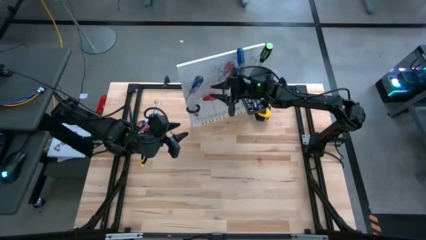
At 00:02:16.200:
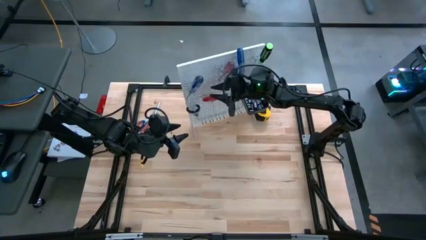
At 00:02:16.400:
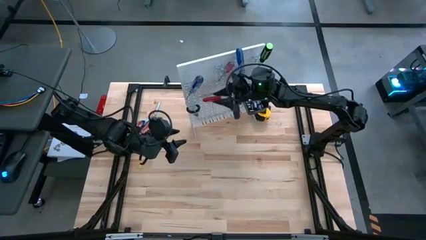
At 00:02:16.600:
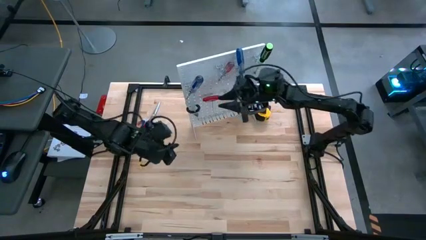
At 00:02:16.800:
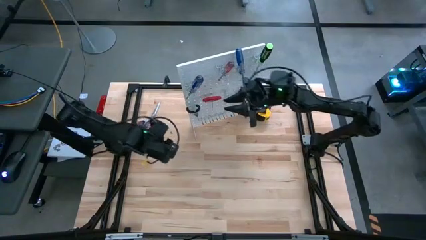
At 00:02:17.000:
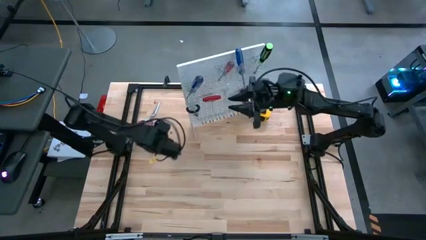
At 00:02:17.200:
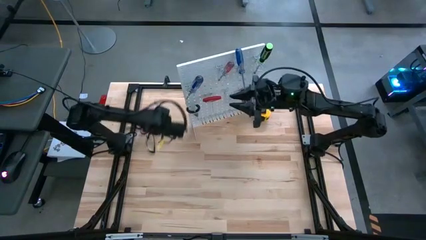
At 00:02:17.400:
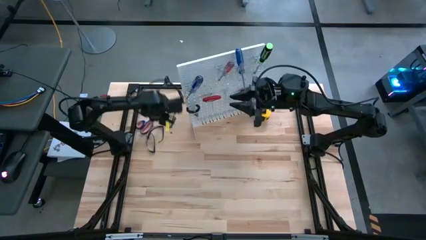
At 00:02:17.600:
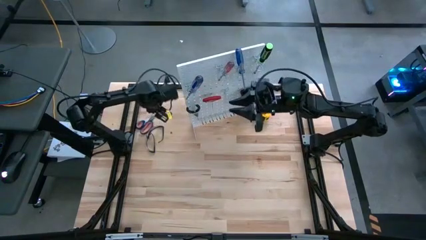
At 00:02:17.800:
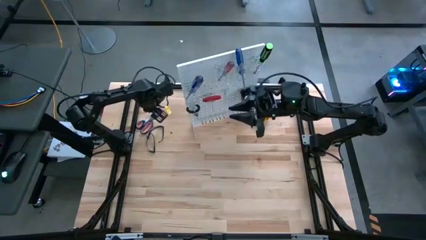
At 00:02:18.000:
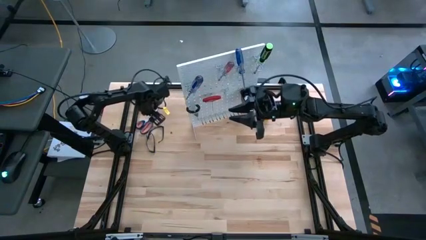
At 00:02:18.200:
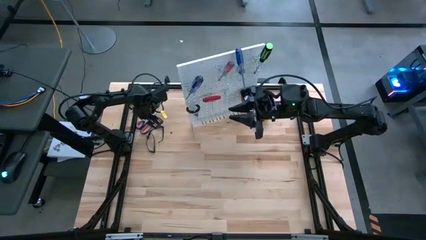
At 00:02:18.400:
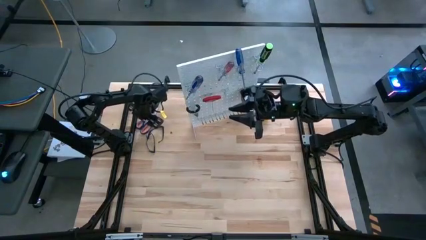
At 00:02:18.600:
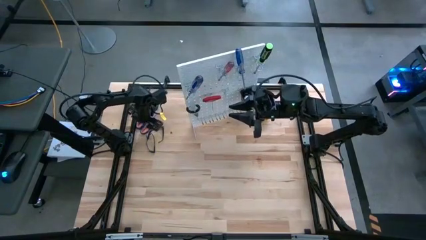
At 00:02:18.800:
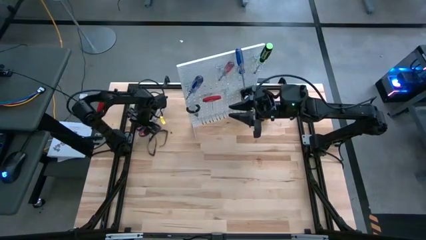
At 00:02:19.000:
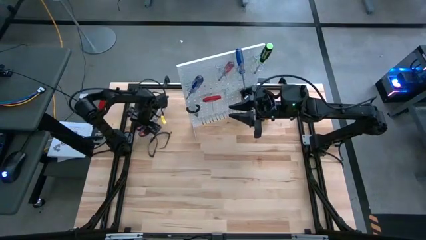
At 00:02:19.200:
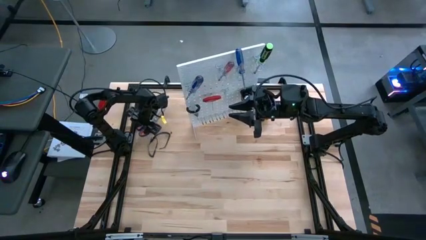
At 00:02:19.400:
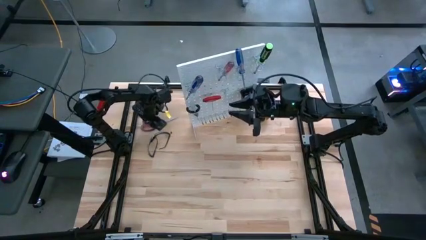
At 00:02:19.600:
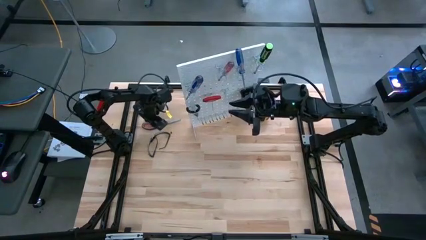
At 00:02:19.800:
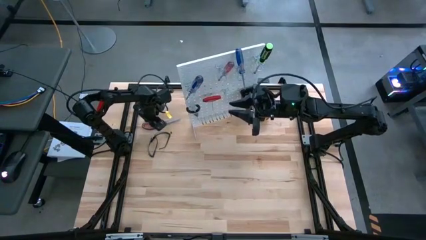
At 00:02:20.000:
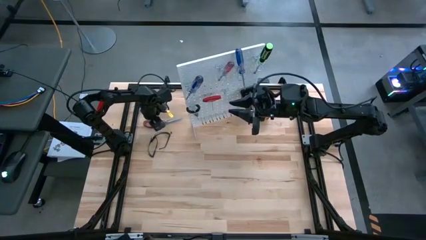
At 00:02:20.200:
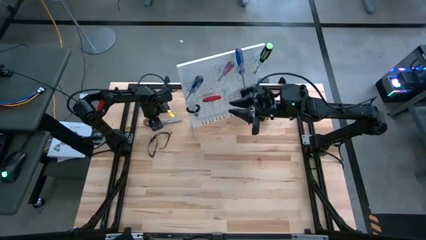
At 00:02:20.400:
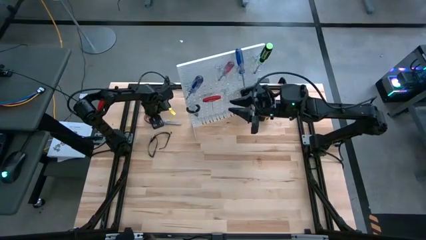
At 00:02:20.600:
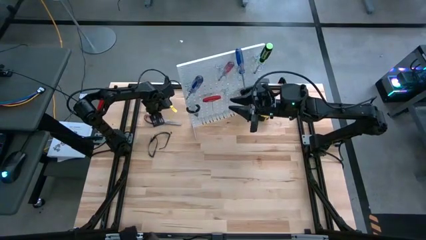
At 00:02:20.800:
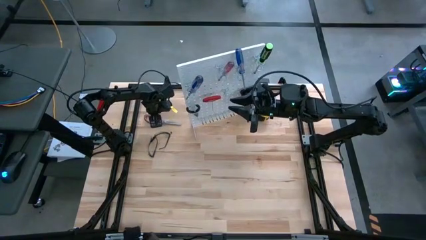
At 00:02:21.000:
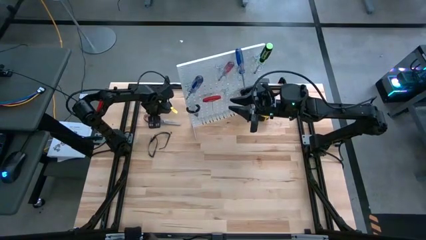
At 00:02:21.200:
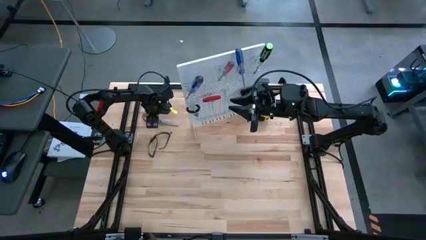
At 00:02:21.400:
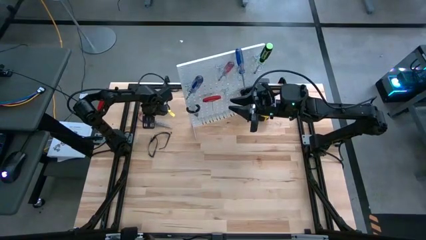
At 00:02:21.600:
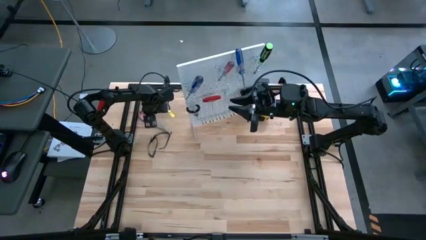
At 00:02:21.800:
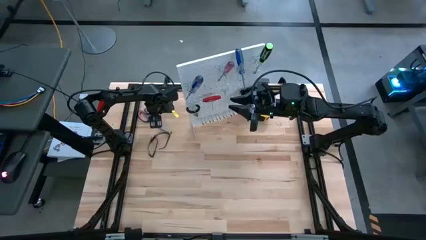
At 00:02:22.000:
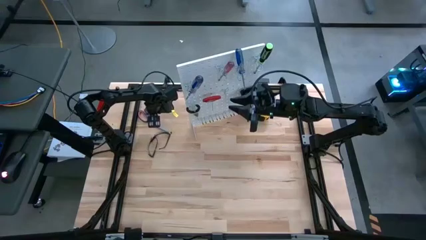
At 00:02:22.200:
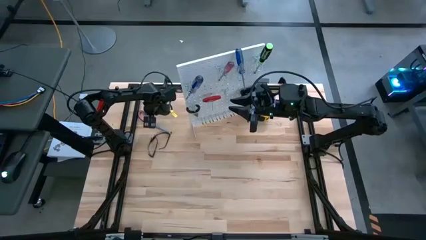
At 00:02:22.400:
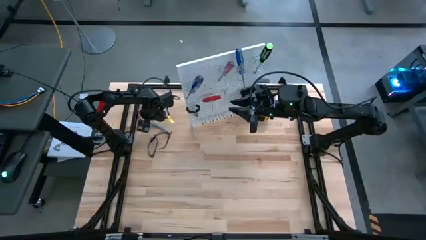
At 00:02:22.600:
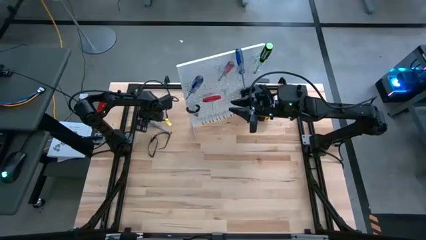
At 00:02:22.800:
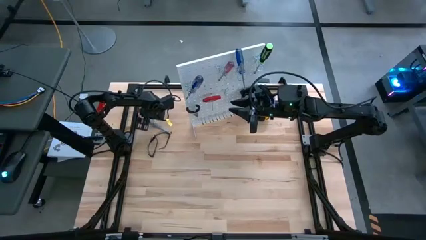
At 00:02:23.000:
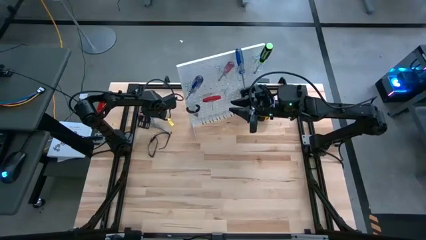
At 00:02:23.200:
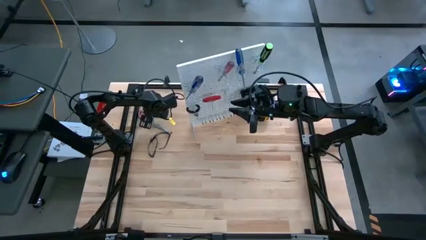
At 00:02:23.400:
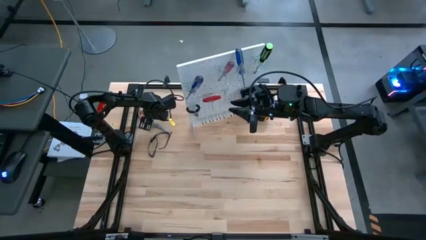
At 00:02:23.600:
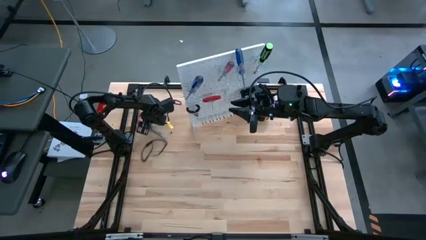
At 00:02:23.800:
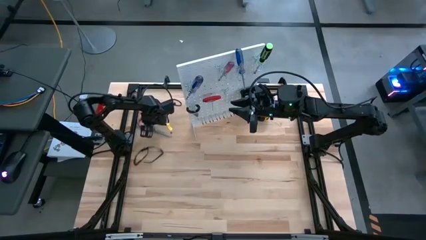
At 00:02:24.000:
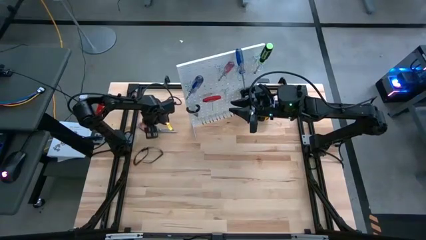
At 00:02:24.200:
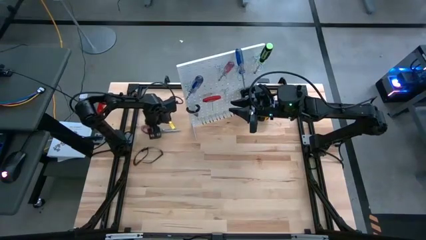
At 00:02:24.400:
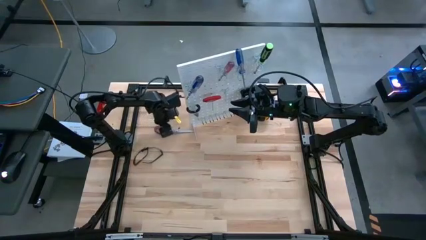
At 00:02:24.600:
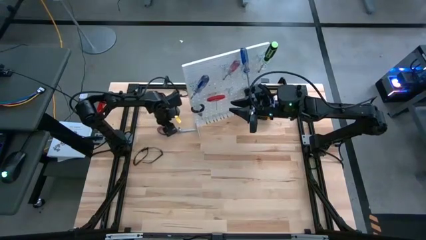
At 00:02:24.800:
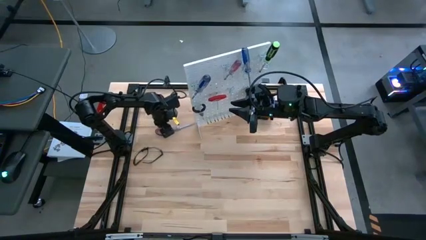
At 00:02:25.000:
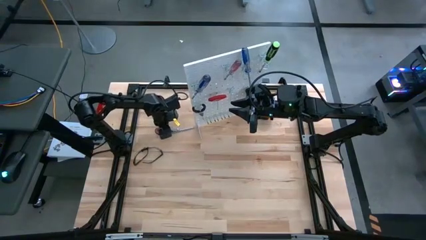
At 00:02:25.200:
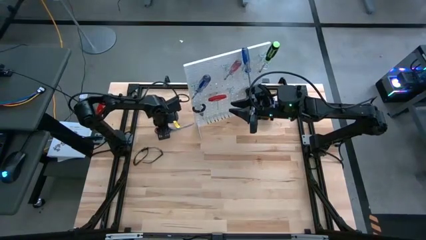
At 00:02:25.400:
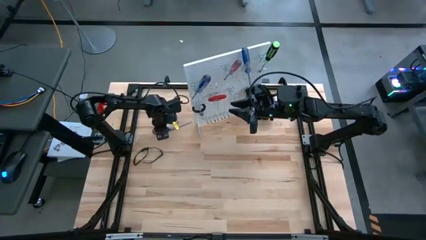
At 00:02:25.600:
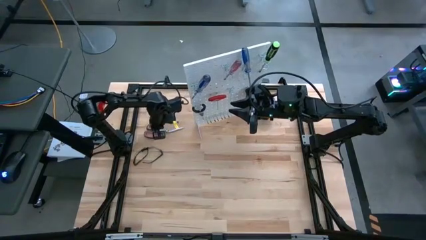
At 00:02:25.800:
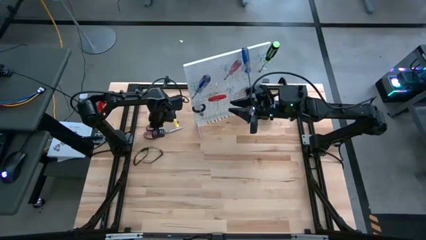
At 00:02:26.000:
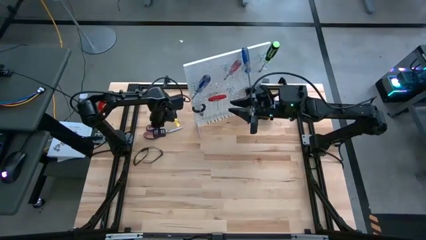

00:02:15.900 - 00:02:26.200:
Task: Hang tools onto peg board
Hang the blue scissors on the peg board

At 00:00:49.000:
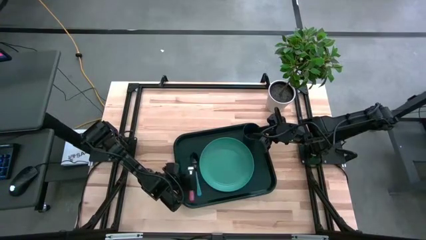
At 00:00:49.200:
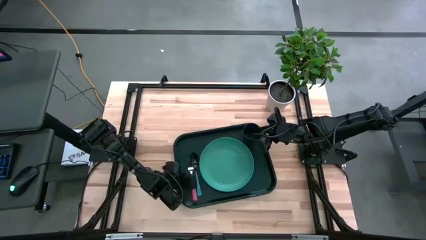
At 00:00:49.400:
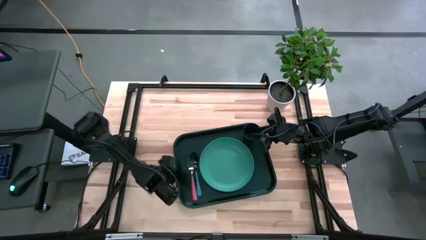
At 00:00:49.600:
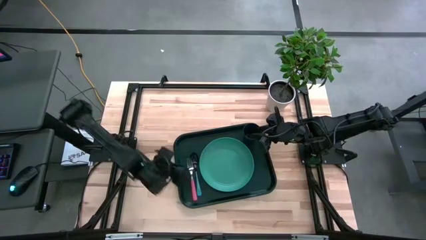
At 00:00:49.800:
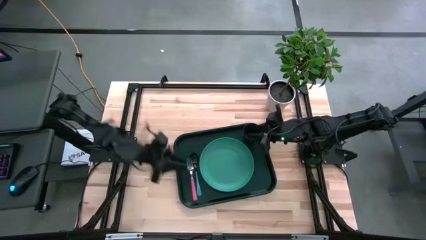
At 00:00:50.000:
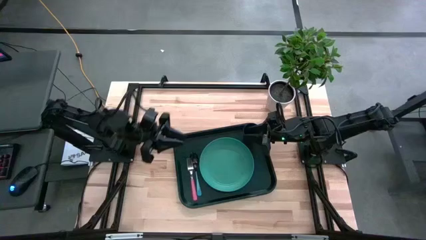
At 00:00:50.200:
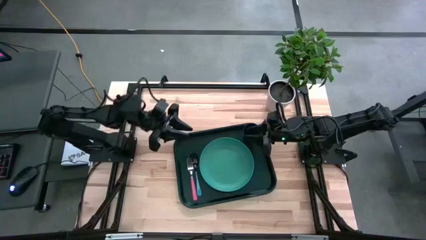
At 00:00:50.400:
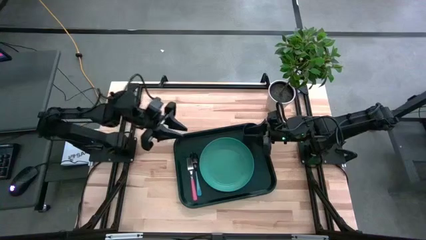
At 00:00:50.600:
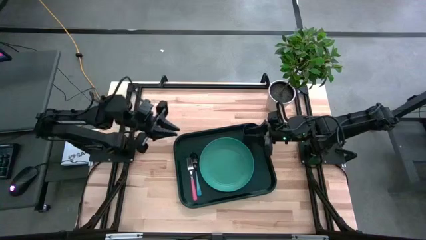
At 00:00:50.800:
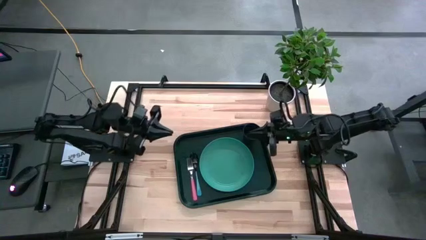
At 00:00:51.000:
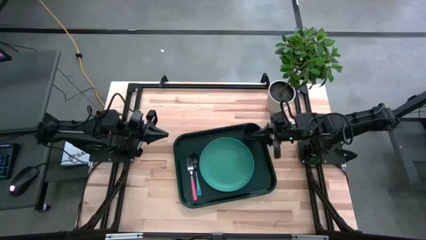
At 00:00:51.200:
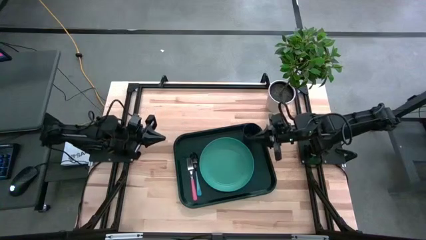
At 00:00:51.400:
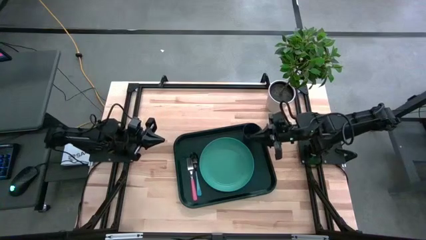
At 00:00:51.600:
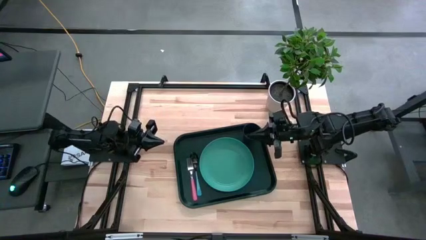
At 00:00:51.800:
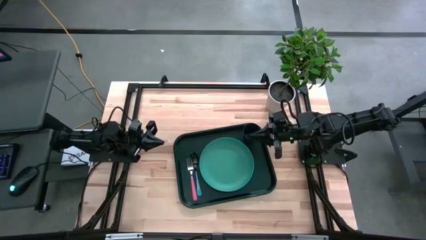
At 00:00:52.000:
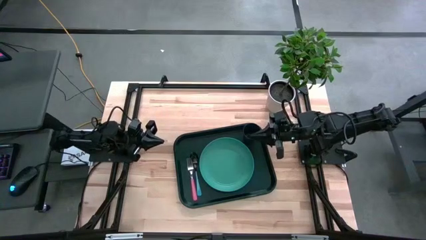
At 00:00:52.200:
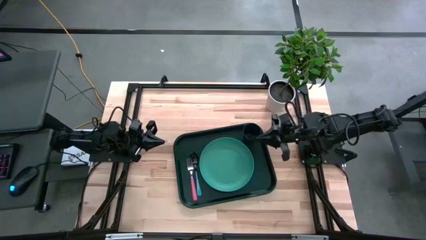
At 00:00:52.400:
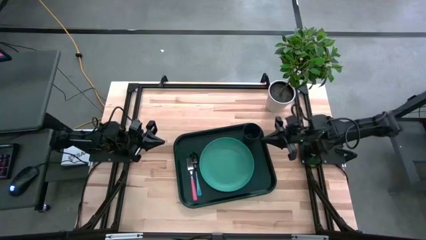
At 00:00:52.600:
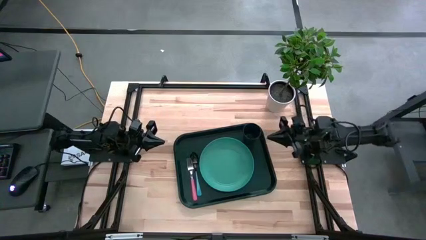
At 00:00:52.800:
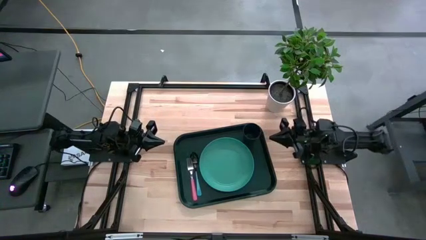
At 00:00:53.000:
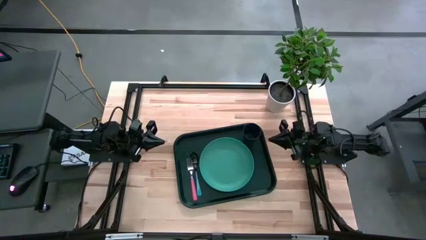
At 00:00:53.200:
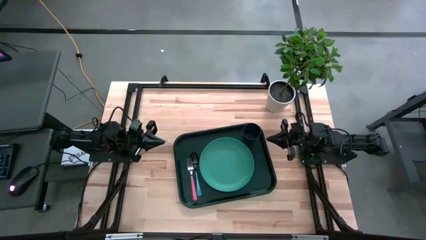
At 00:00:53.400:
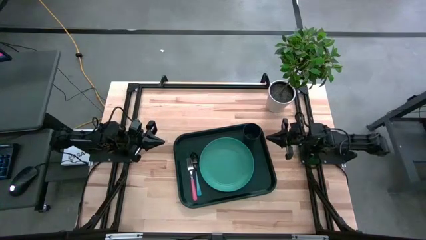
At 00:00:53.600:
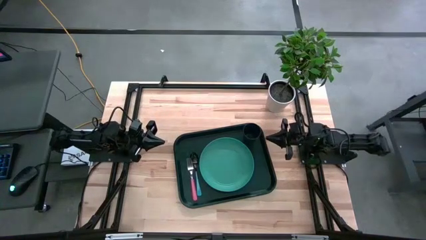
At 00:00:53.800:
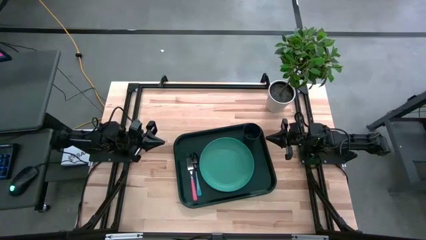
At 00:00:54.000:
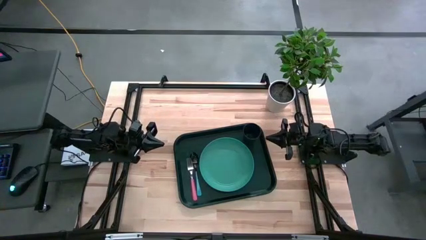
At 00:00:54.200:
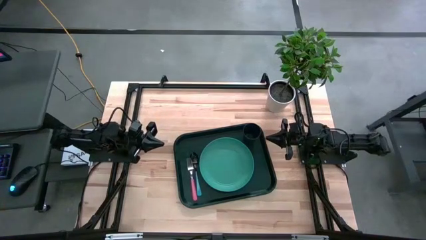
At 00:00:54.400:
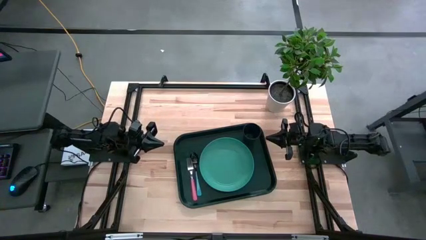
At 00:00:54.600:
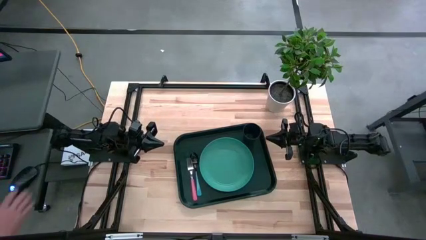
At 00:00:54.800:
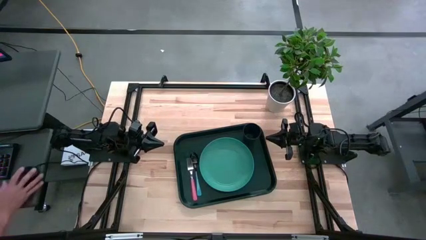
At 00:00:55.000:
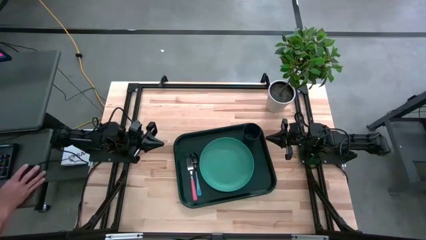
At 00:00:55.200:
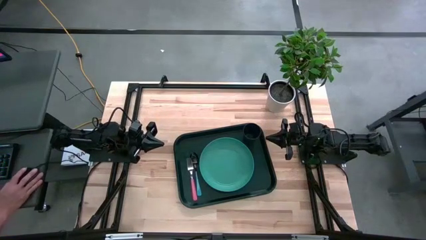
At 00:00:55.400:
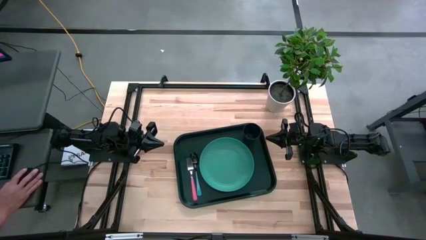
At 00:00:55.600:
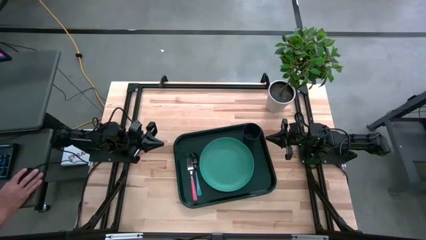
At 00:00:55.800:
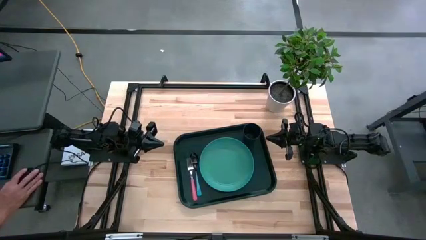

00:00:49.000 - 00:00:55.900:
Task: Pick and place plate/cup/fork/spoon on tray
Return to Home Position
